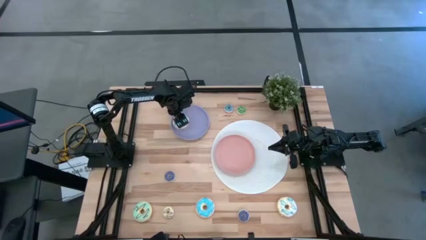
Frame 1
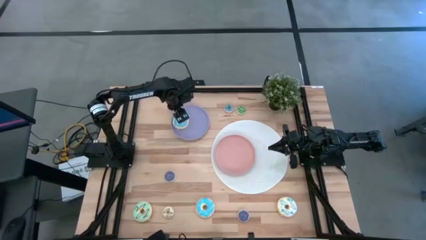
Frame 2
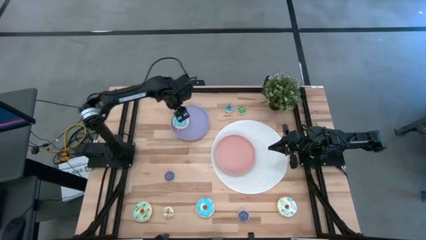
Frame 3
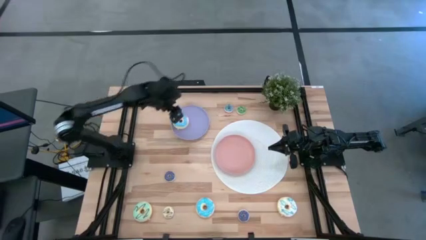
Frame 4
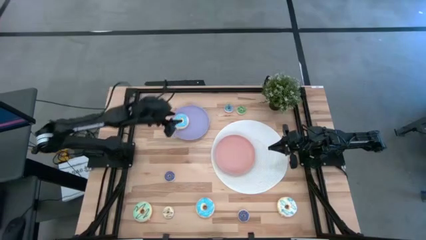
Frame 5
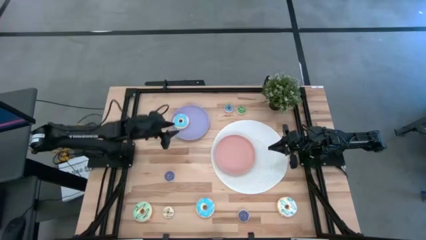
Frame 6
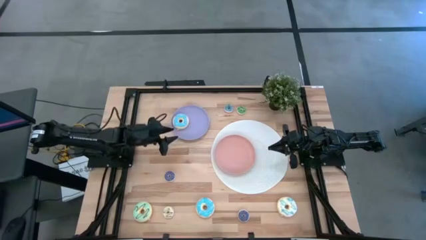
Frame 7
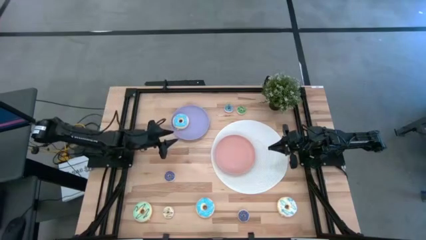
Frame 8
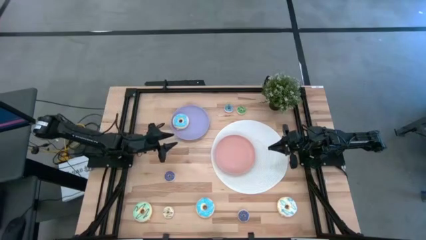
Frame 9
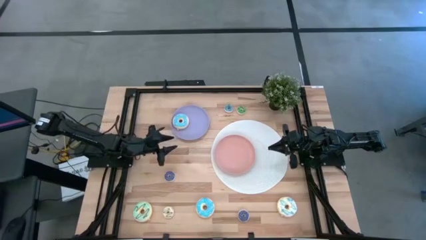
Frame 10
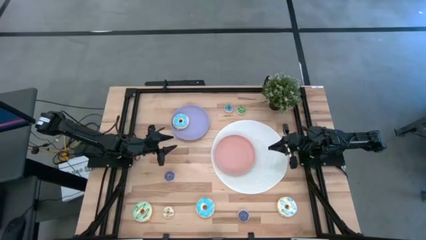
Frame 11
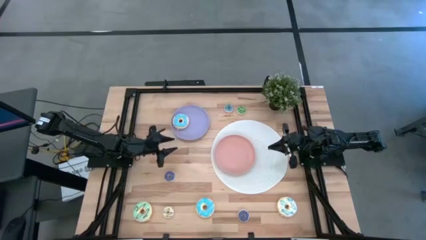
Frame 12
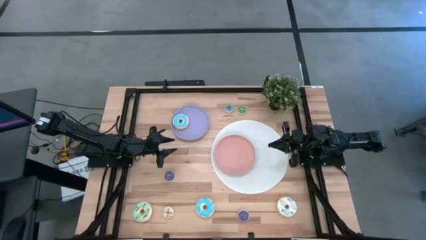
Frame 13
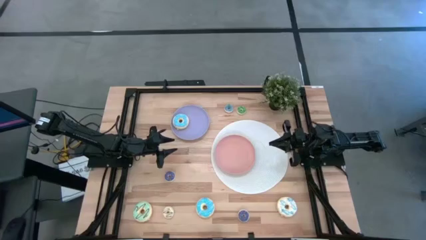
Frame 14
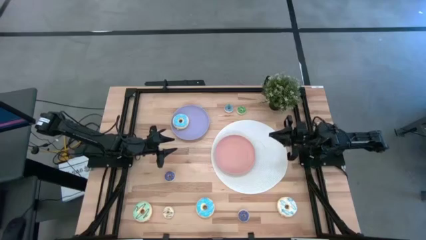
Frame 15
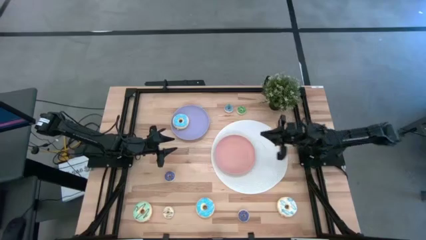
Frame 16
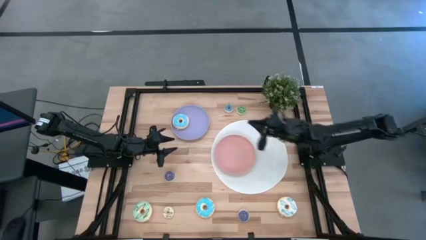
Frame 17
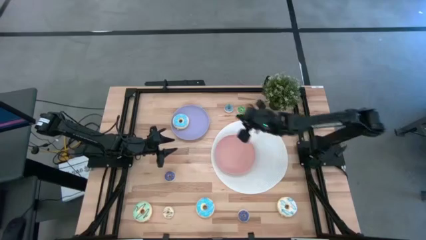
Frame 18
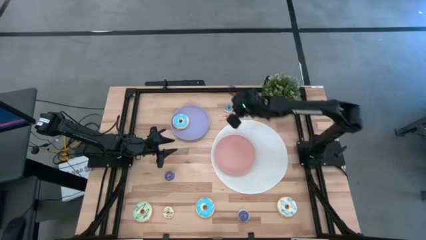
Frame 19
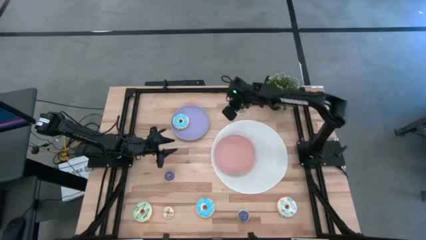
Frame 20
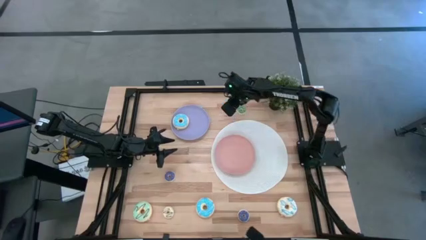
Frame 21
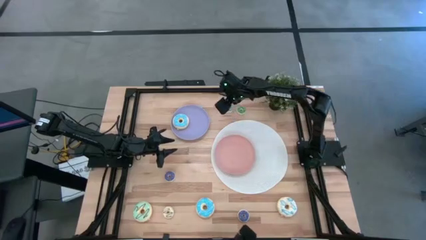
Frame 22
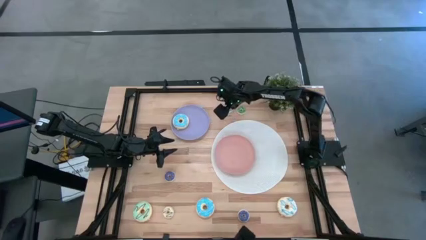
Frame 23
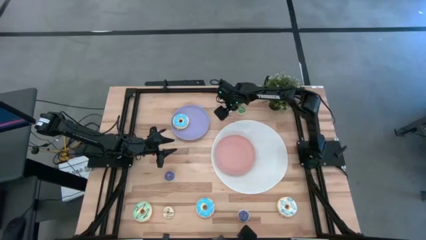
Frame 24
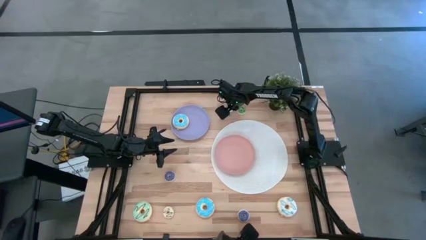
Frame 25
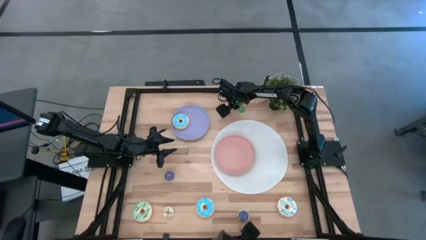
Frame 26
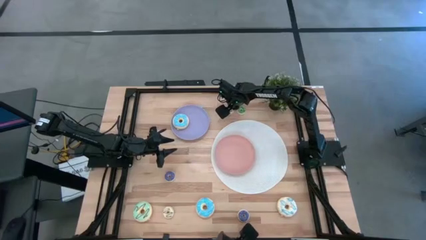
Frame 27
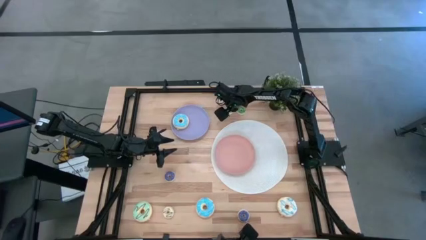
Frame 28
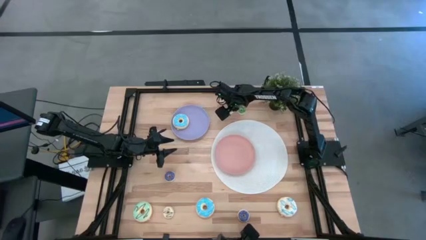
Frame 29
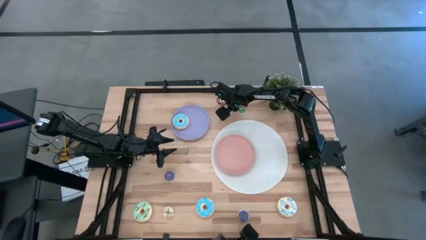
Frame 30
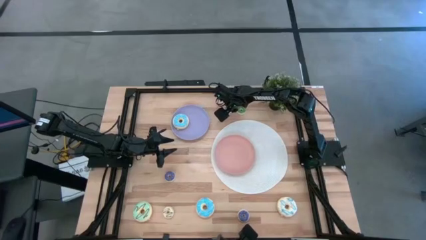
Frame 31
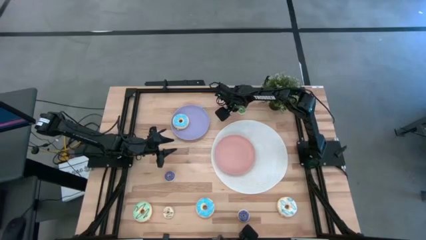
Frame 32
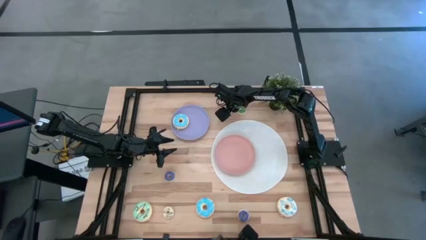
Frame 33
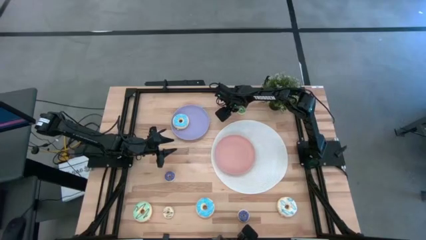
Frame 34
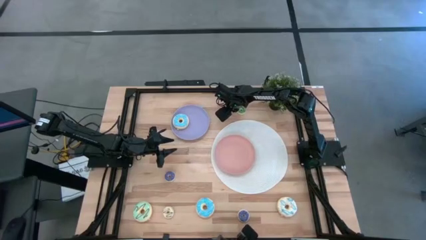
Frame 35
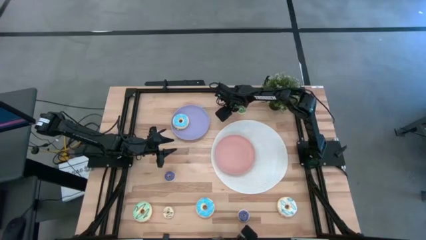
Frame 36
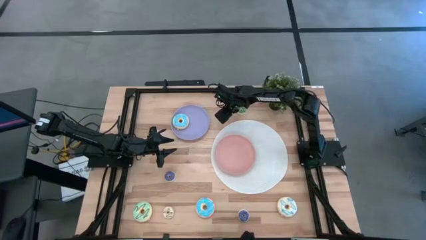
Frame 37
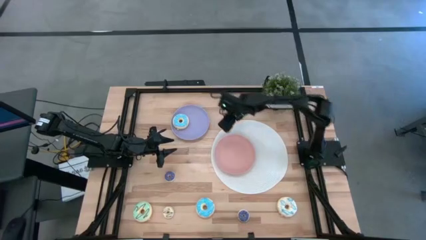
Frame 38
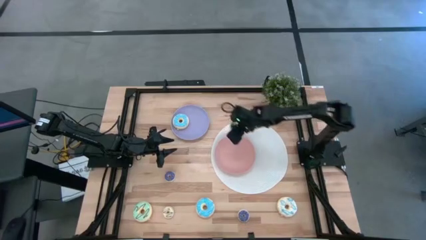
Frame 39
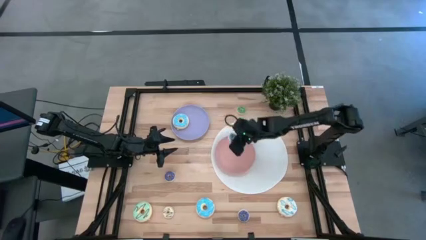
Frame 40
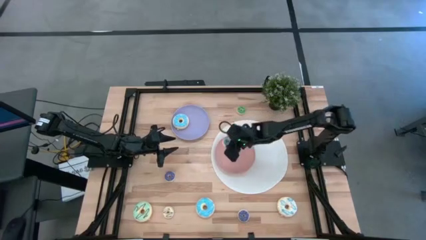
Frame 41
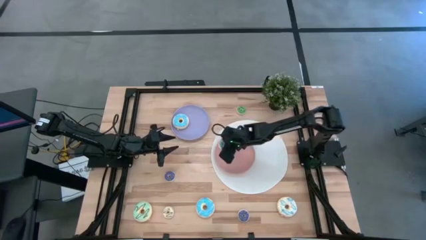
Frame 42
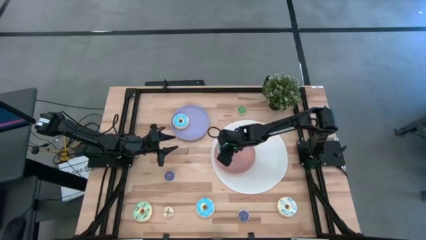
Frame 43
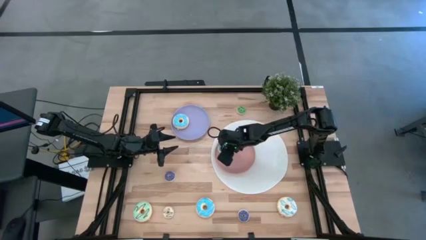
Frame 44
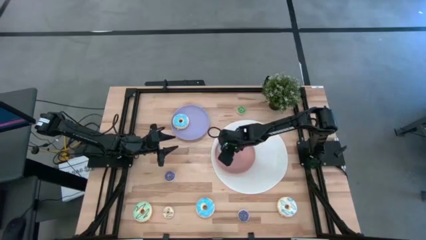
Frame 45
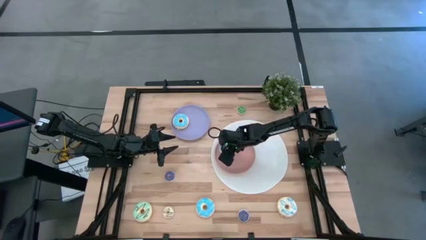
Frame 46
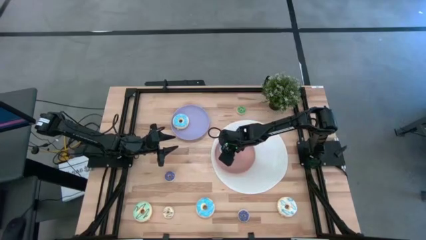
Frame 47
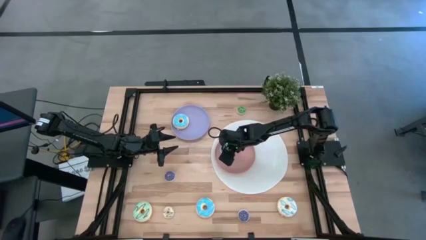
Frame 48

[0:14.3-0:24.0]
Task: Pick & Place donuts
Put the small blue donut on the pink plate

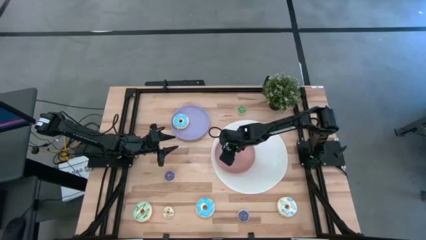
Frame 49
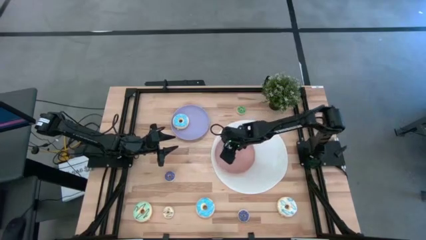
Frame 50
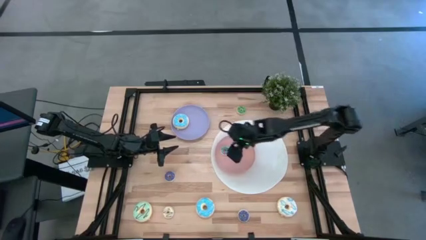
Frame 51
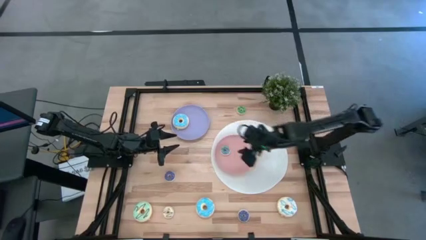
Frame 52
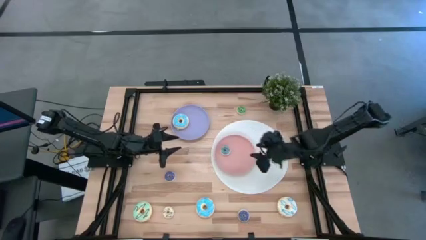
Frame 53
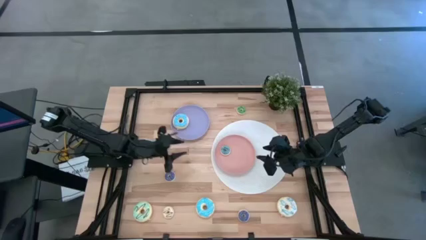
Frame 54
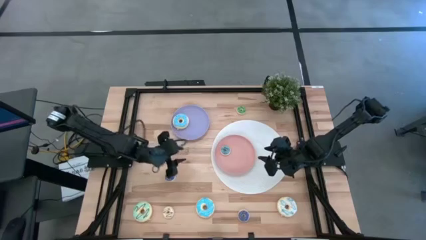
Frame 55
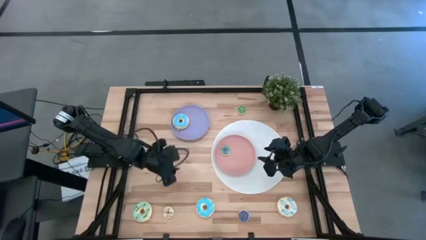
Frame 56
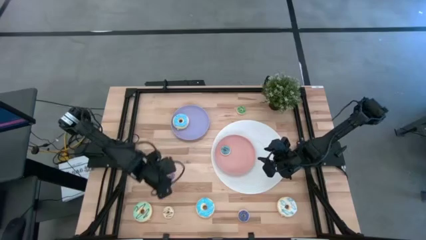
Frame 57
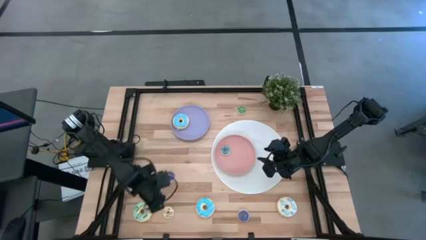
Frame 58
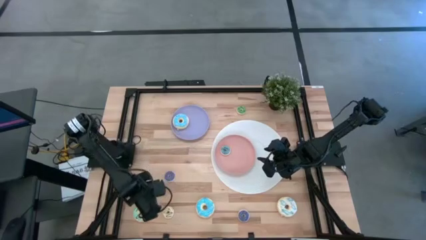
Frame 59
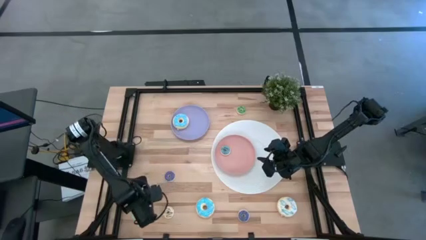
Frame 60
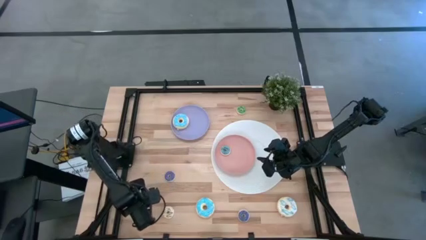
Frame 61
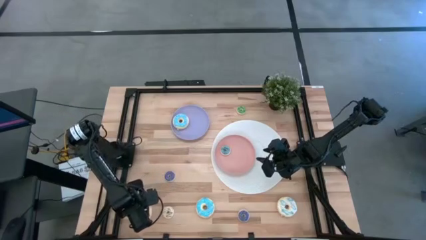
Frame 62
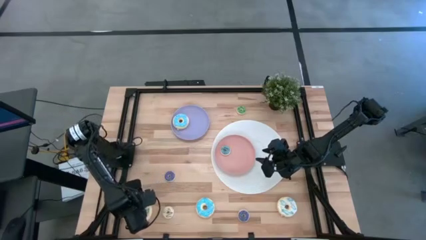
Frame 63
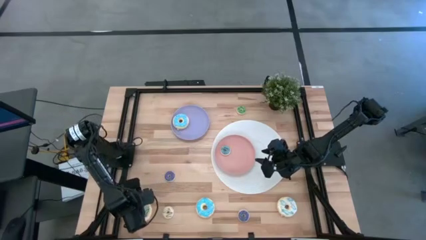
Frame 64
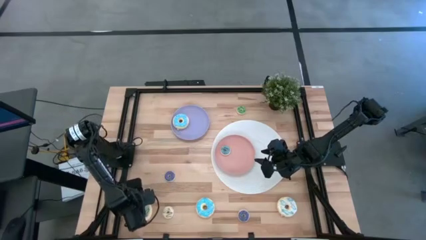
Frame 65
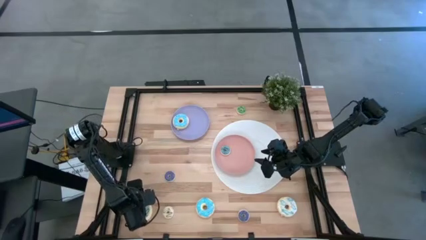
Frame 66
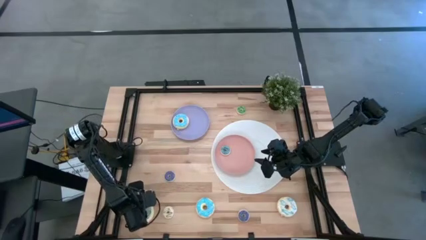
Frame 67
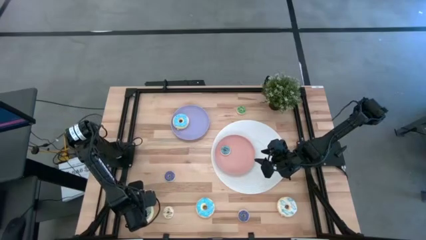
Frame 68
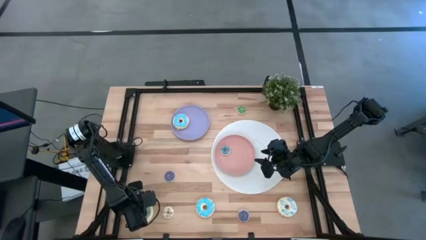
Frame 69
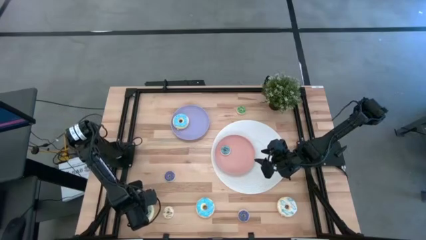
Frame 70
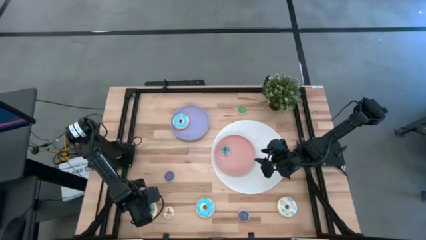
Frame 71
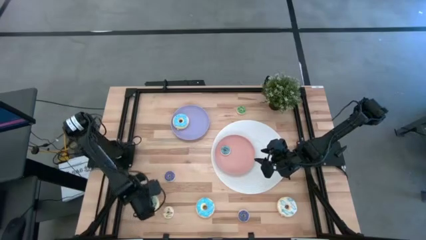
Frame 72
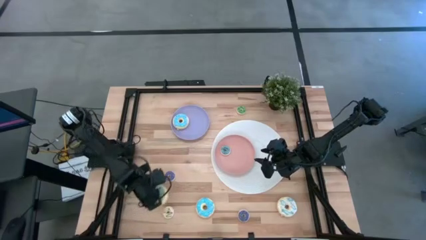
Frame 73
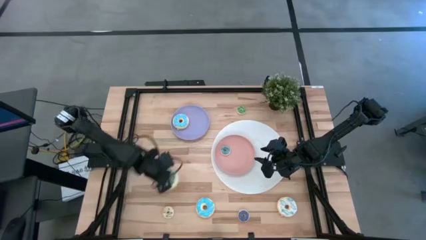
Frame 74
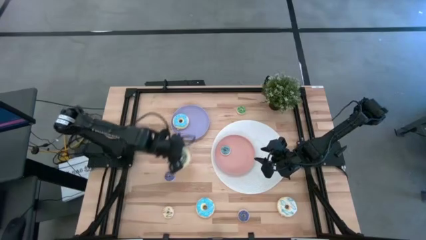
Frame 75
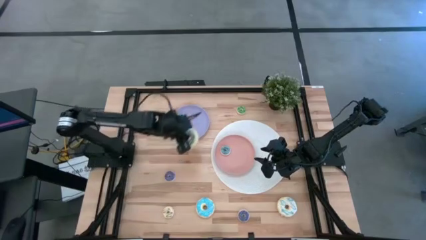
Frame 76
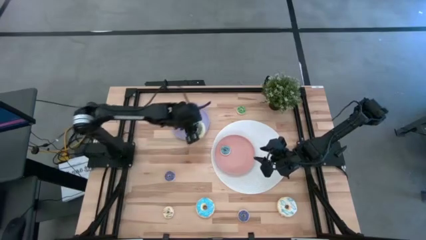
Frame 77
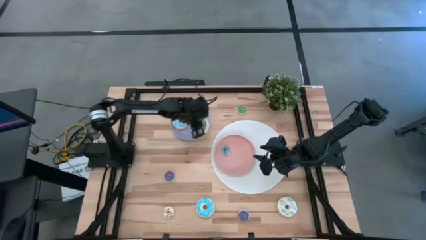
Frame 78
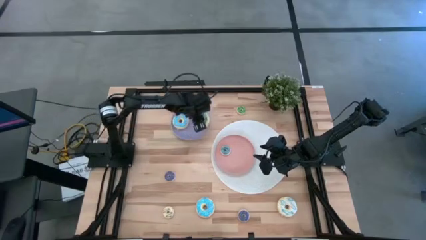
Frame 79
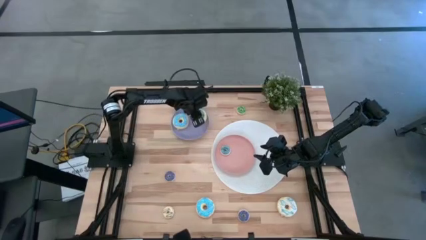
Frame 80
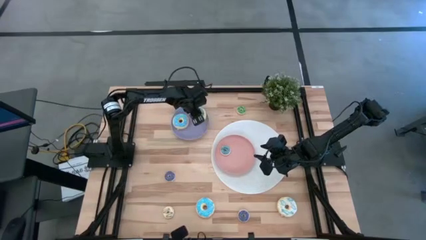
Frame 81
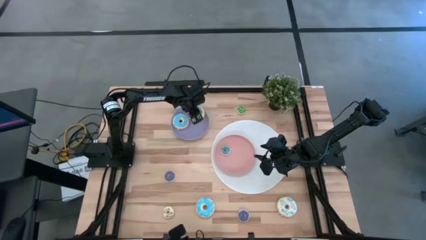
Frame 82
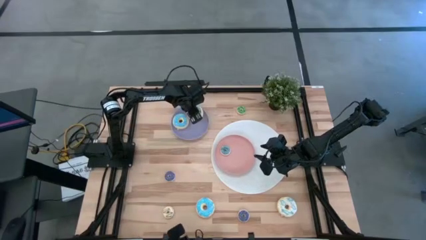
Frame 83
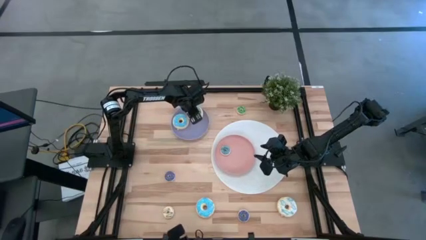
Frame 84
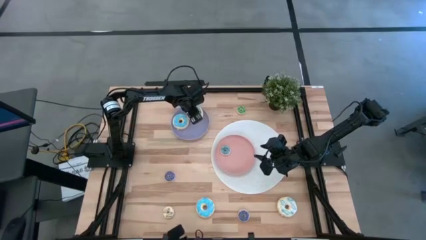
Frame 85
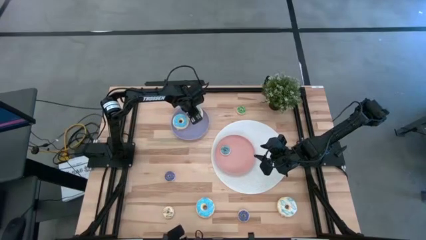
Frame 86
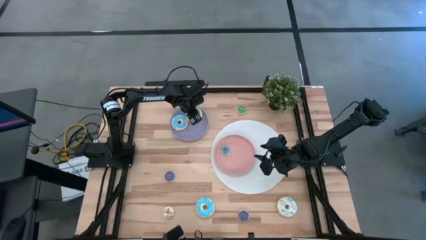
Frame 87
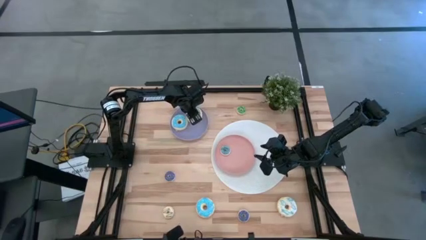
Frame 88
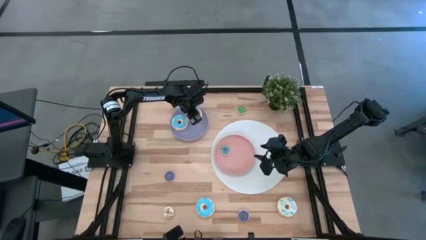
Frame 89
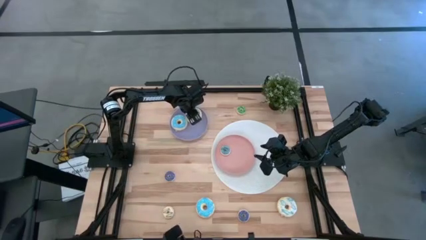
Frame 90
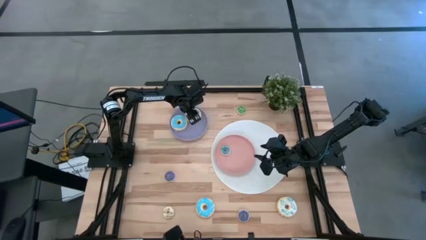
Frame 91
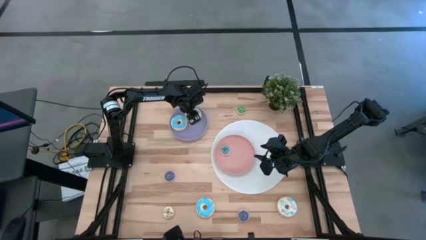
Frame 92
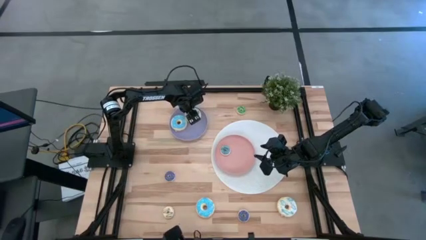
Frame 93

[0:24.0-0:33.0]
Put the big light green donut on the violet plate
